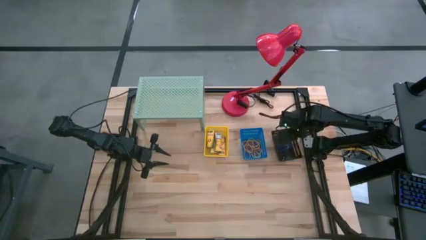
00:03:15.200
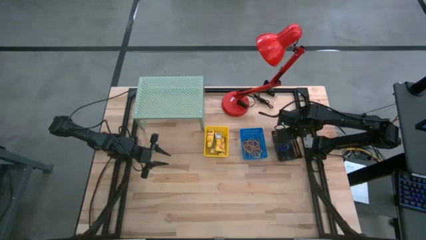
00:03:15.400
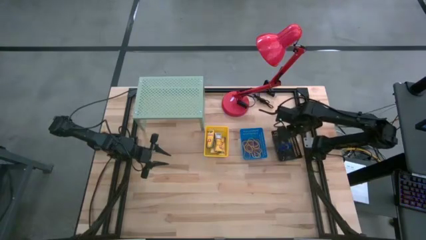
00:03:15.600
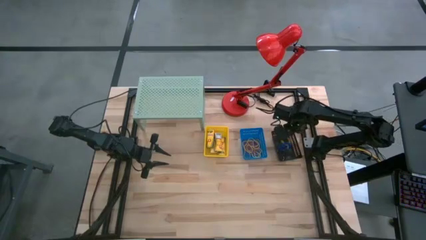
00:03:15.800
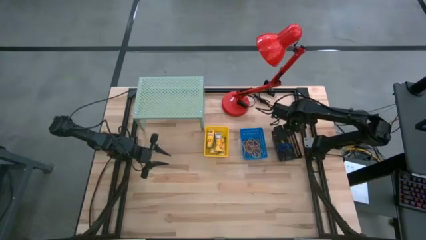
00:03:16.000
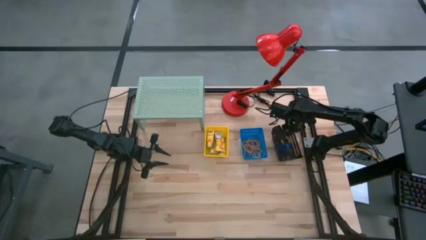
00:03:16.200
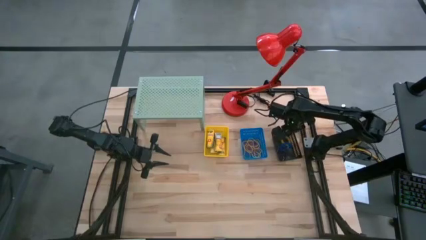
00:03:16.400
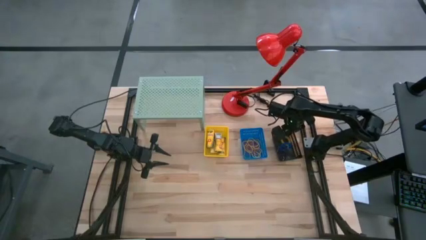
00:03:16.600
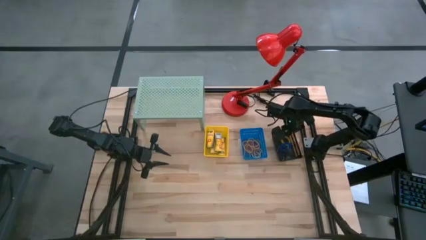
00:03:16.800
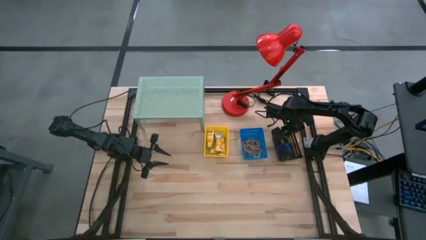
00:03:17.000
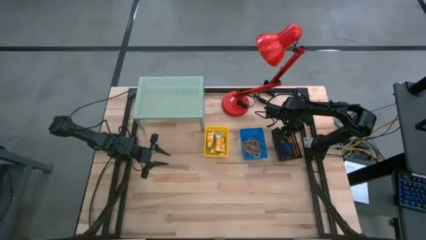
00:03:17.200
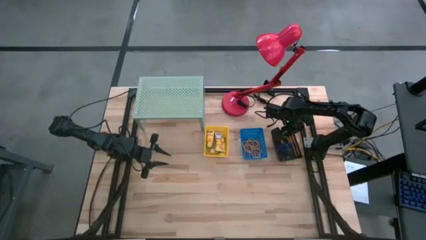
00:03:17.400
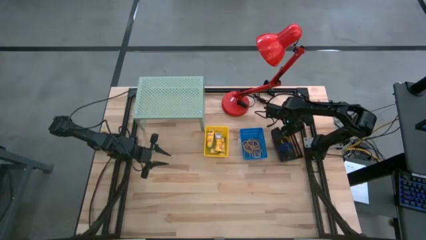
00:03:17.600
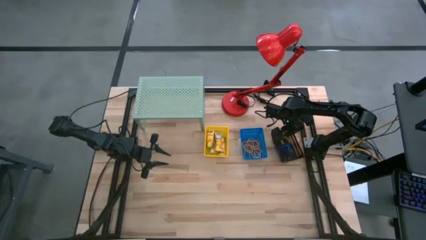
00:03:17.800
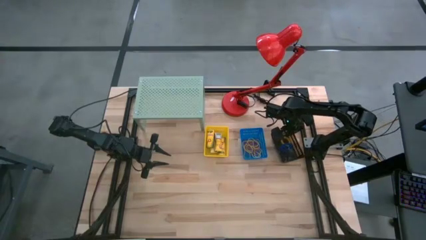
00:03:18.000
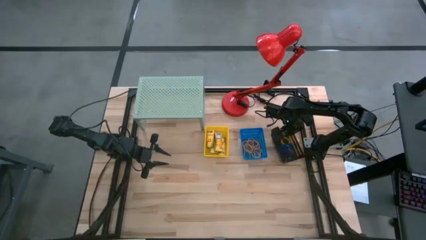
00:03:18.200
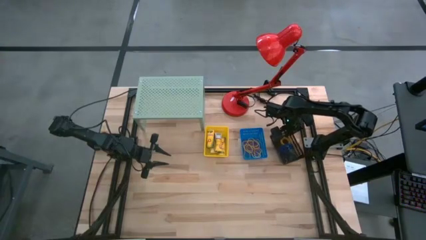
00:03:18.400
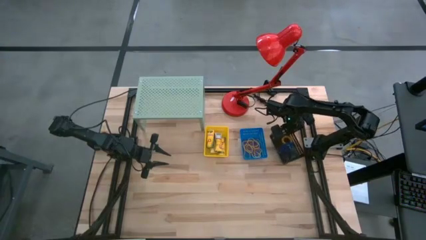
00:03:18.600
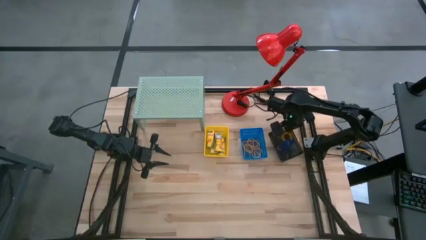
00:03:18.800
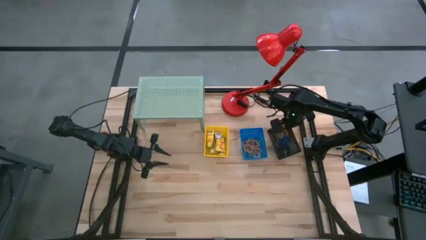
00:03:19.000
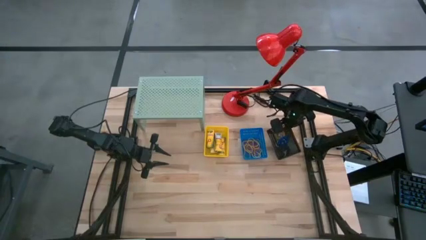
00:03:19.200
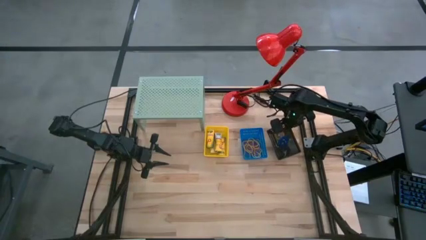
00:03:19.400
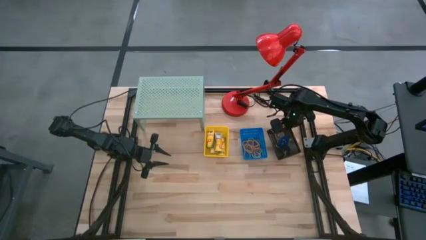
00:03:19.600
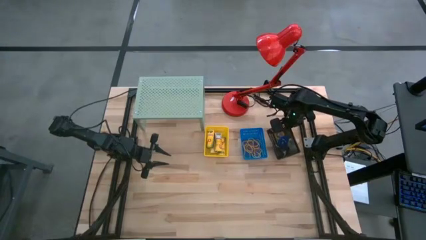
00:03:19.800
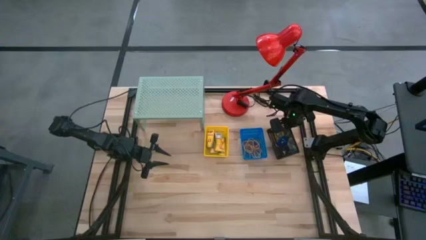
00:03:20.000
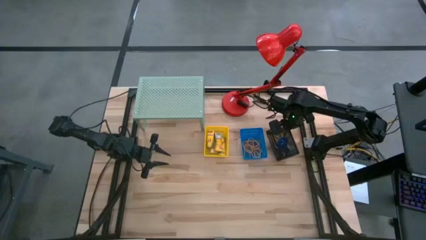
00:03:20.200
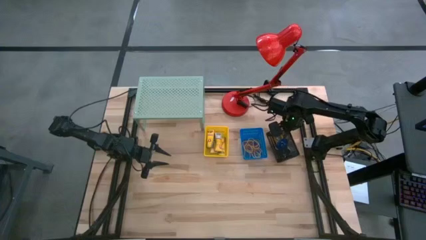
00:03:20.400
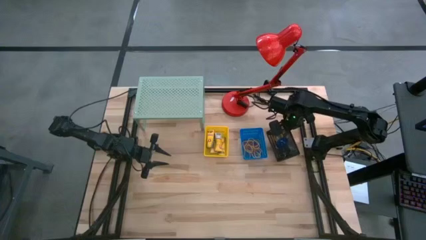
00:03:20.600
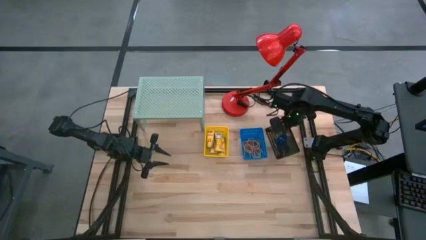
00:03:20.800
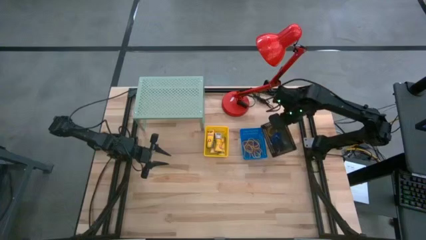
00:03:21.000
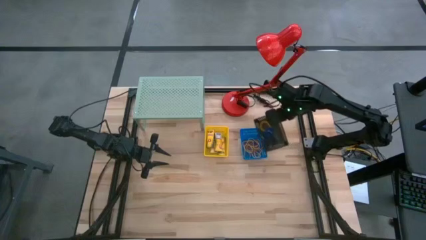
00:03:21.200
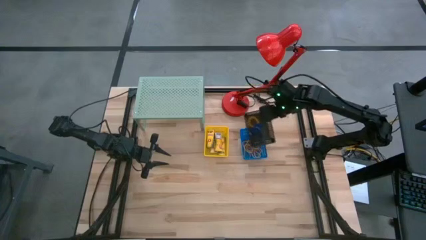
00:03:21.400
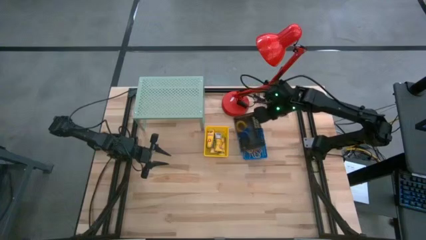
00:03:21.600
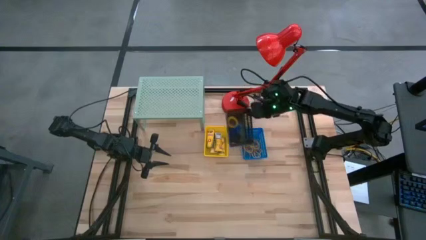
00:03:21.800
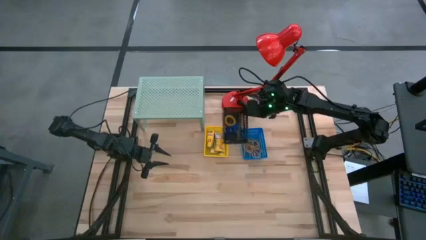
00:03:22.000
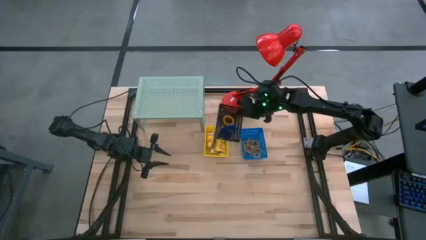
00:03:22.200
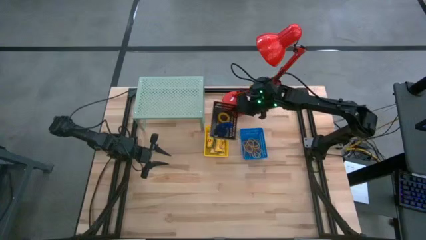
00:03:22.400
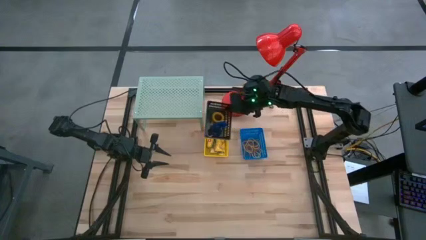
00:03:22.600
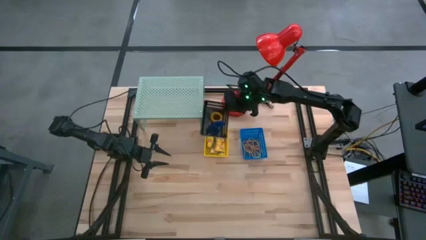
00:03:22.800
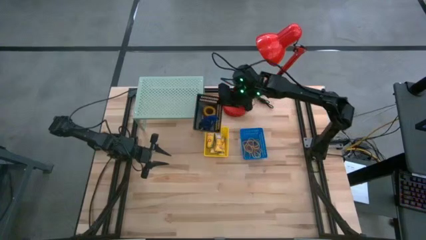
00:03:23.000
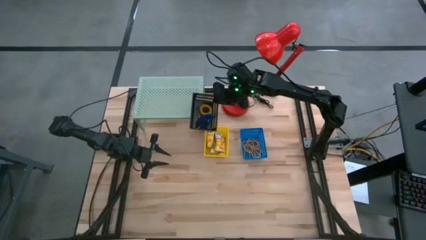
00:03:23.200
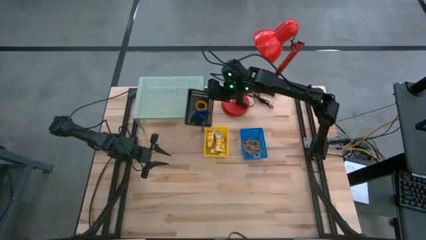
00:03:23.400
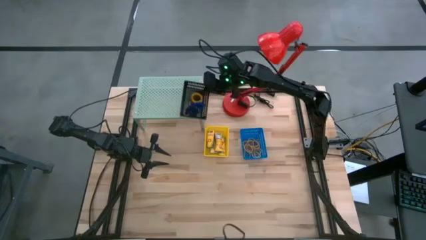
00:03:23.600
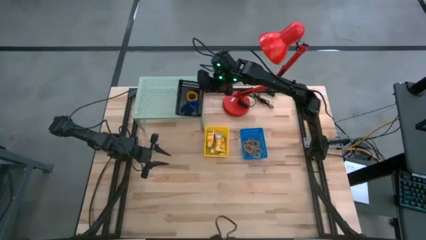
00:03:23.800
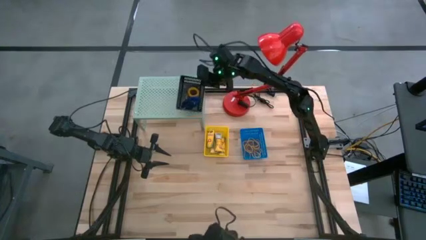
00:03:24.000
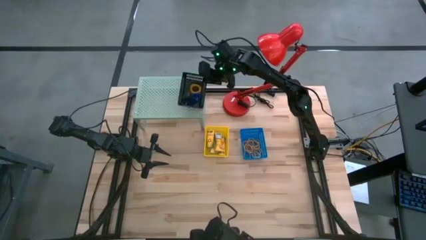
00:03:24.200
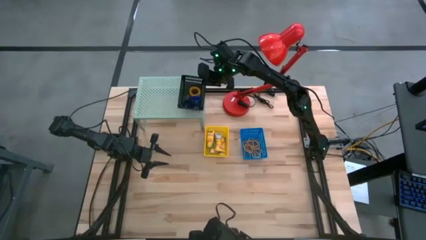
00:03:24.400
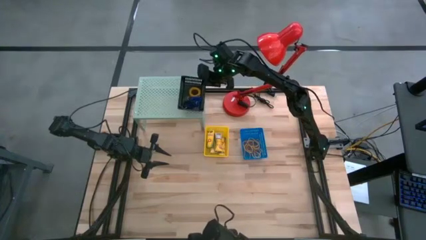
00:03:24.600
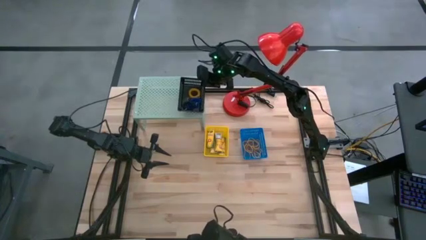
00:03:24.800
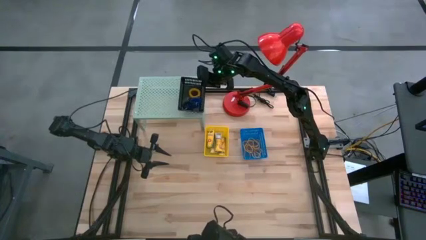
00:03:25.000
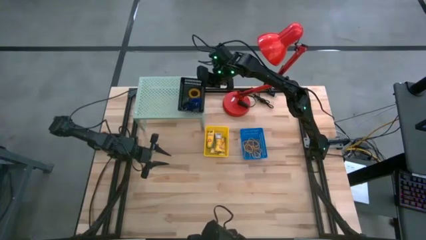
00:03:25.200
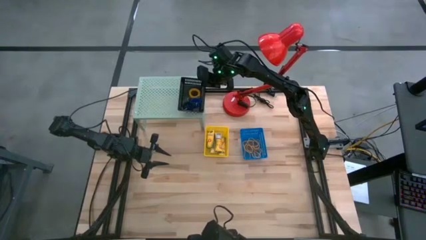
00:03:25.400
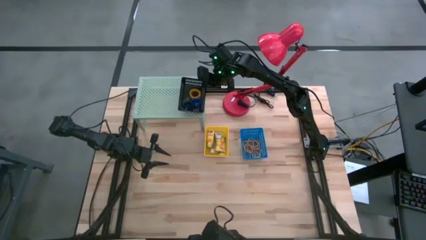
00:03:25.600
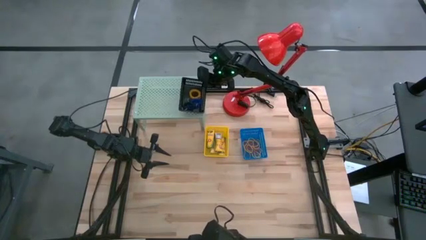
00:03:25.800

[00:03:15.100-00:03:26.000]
Task: Pick & Place Office Desk Supplies
Put the black basket filled with spring keychains on the shelf

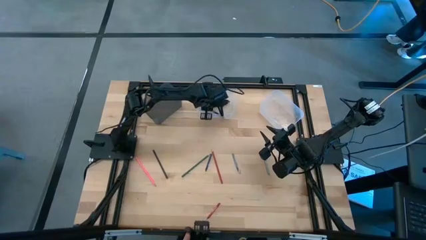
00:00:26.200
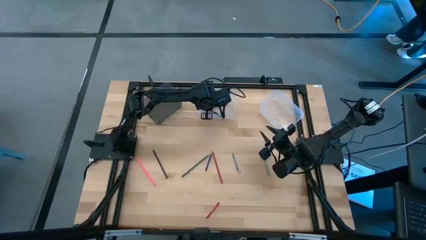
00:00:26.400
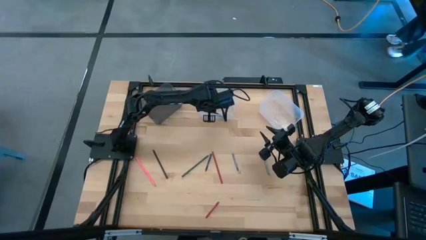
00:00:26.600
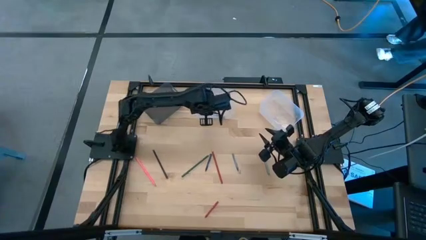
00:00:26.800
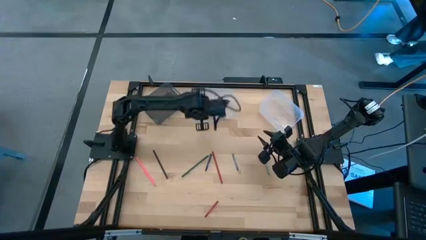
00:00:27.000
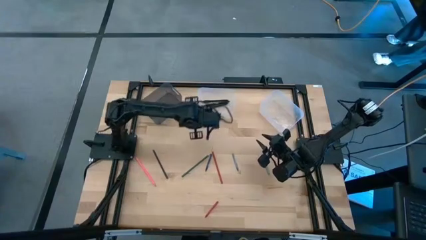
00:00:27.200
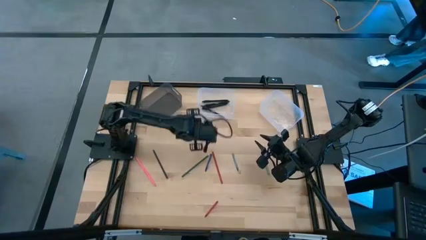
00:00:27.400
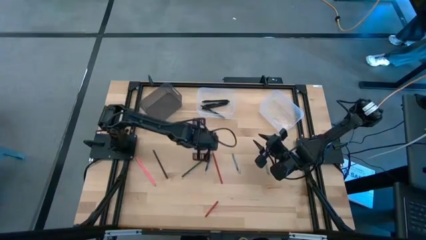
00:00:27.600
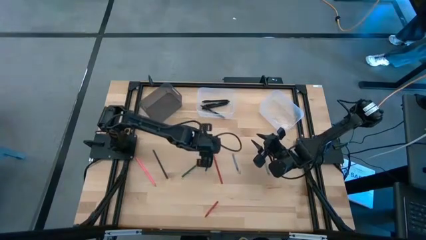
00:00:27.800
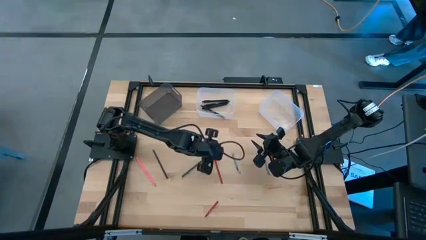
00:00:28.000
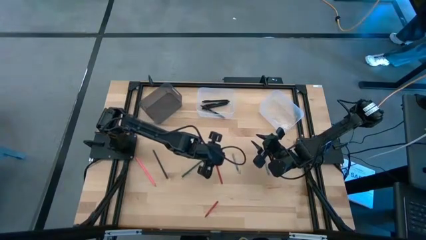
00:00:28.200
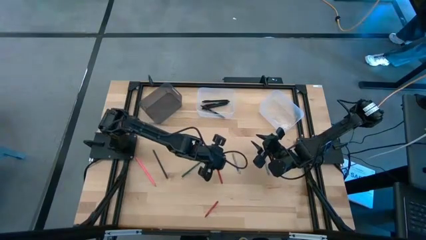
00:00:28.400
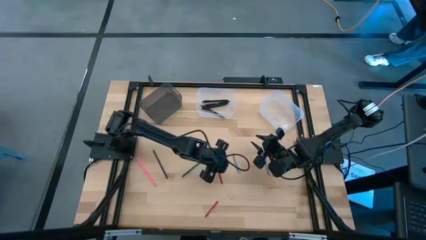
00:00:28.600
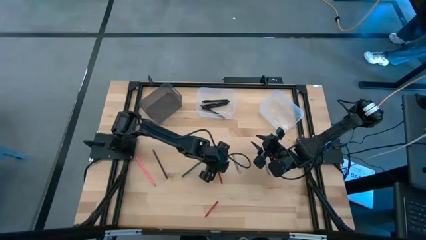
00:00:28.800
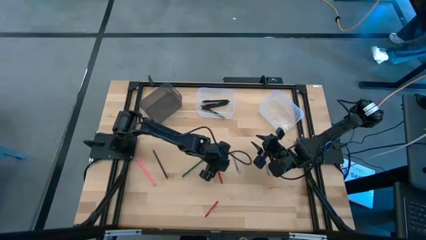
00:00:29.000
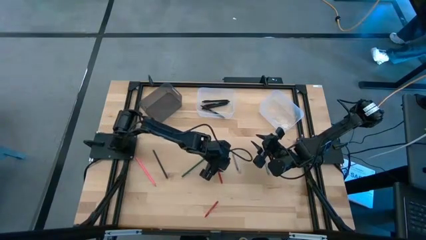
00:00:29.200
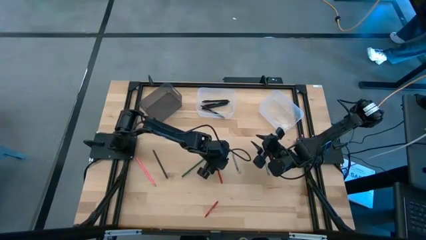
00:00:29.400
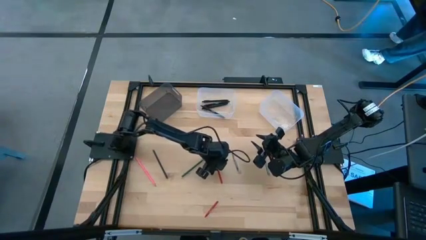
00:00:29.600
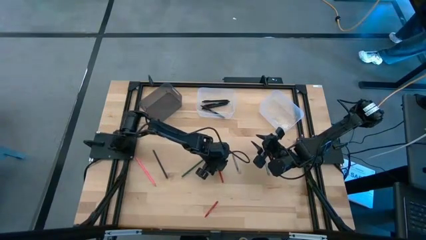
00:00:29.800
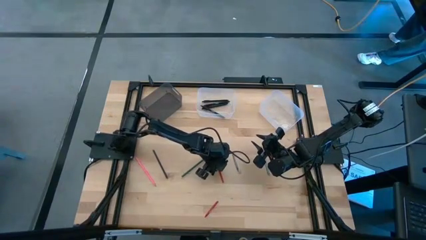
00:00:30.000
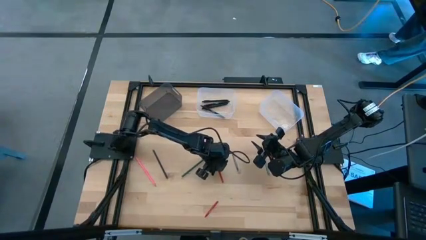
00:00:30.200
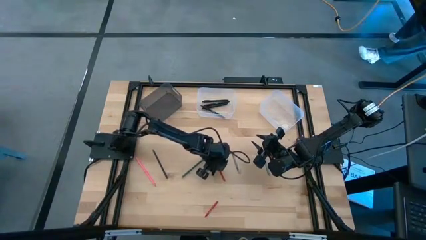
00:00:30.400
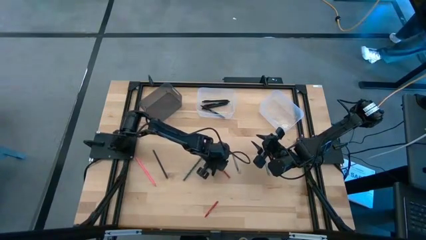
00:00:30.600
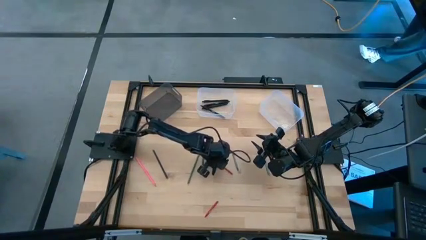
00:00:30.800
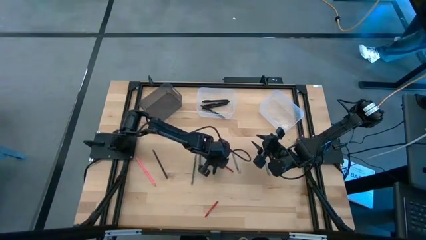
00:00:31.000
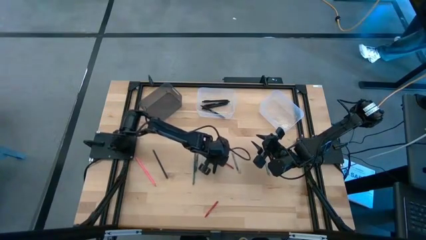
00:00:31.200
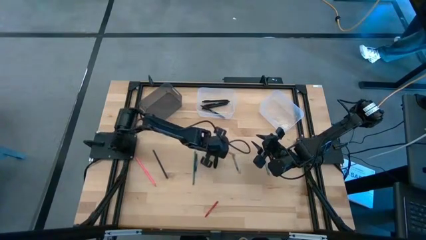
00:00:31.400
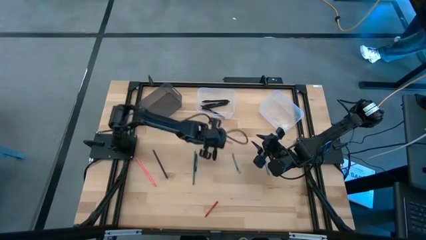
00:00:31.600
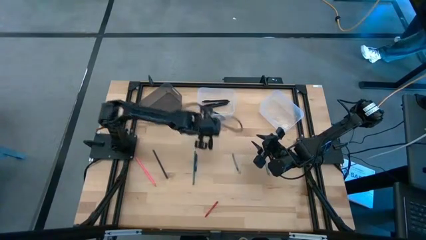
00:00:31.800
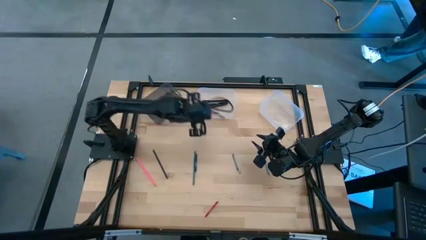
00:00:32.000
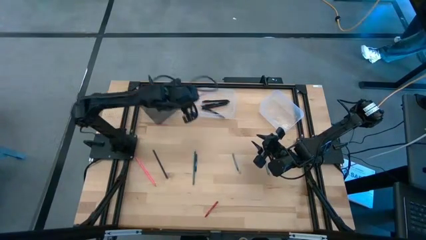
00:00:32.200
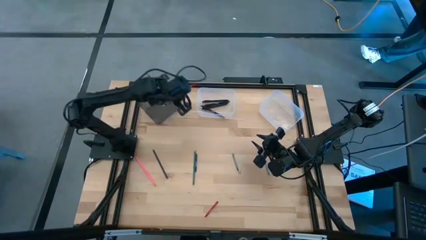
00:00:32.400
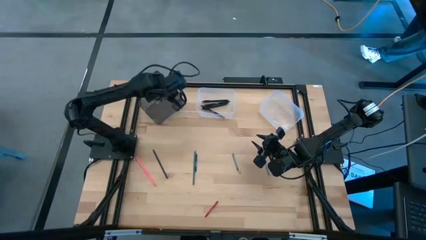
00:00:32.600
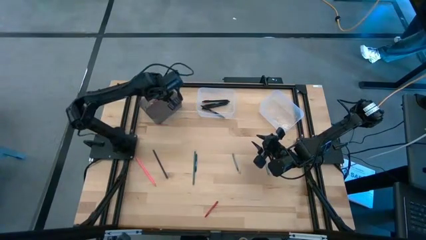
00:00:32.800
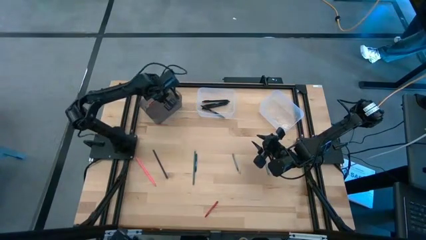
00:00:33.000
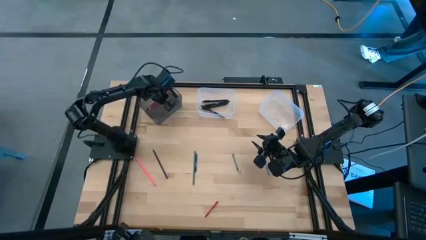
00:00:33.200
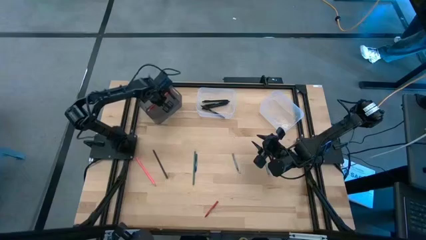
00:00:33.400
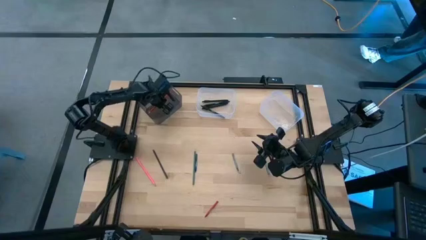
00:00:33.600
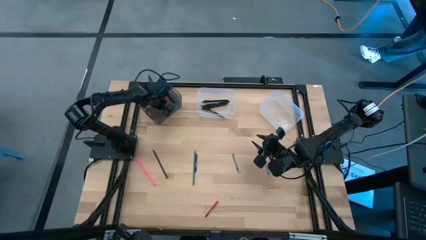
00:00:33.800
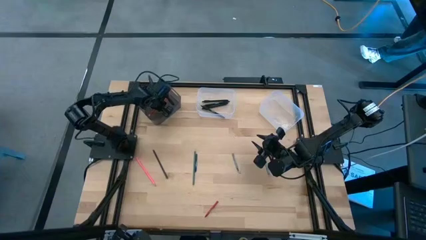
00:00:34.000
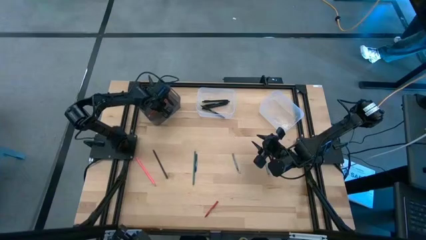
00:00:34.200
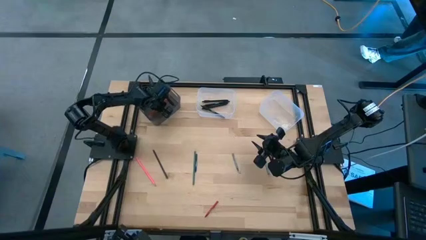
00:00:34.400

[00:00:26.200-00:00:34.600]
Task: Sort crayons/erasers/pens/pencils in bins
Put the red pencil into the black bin
